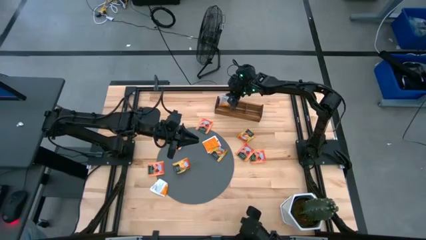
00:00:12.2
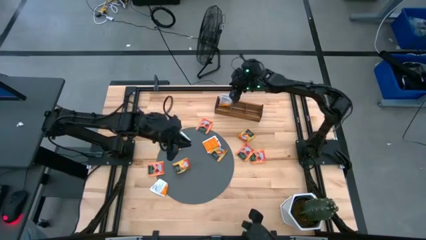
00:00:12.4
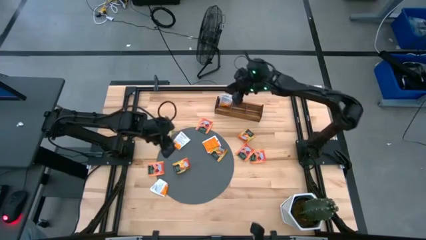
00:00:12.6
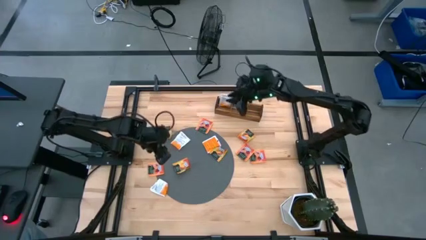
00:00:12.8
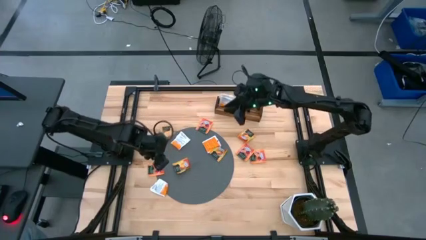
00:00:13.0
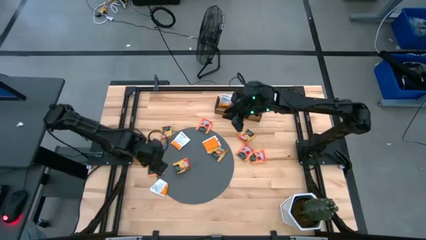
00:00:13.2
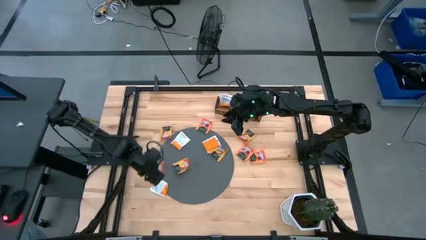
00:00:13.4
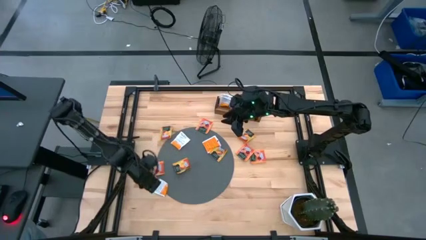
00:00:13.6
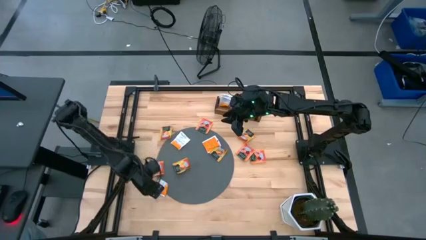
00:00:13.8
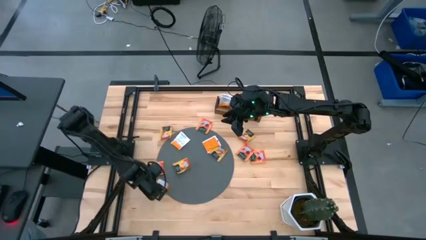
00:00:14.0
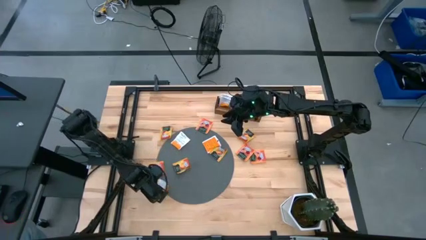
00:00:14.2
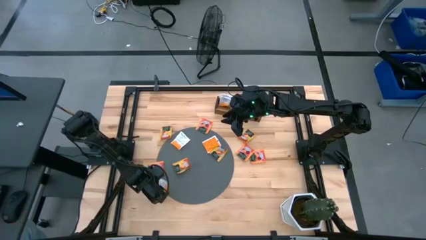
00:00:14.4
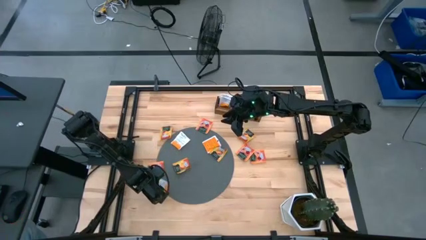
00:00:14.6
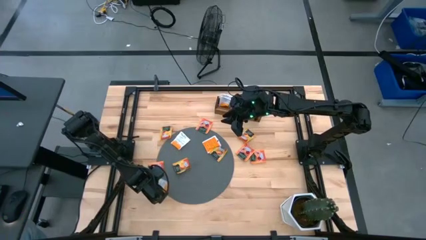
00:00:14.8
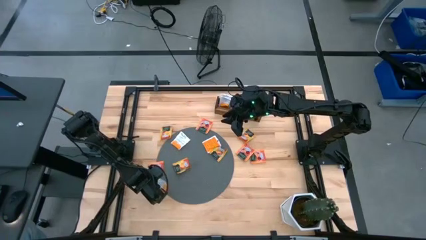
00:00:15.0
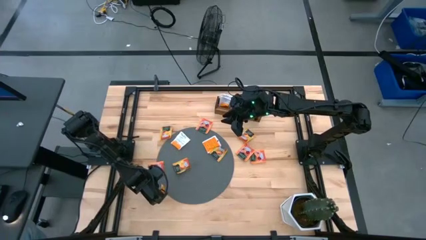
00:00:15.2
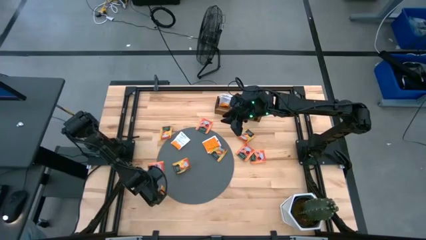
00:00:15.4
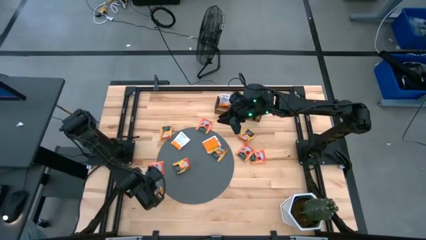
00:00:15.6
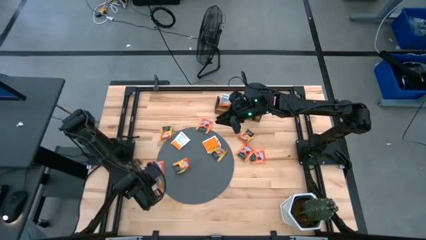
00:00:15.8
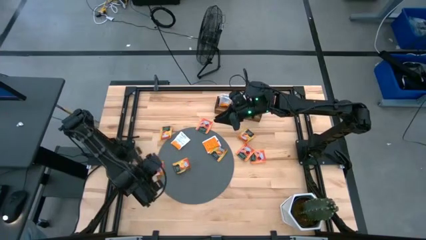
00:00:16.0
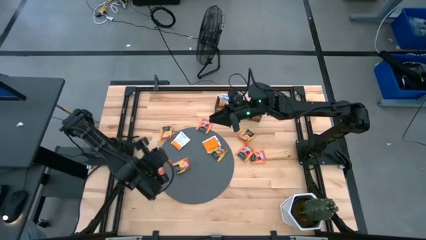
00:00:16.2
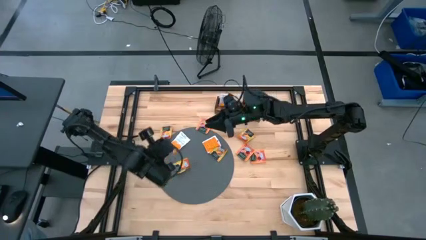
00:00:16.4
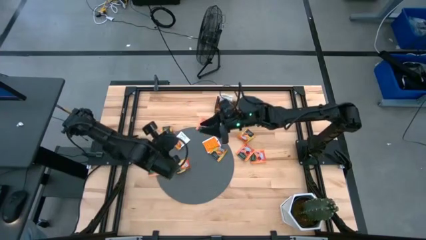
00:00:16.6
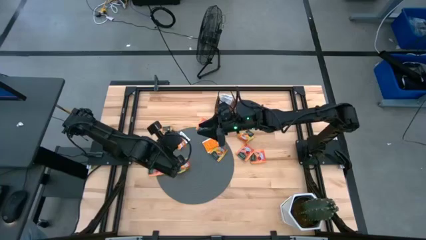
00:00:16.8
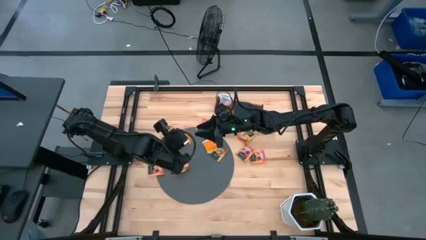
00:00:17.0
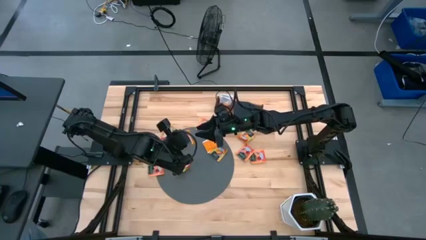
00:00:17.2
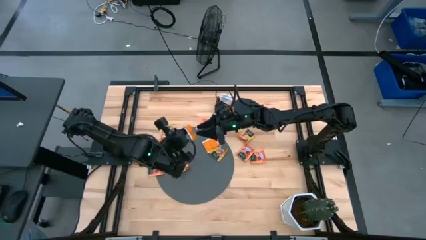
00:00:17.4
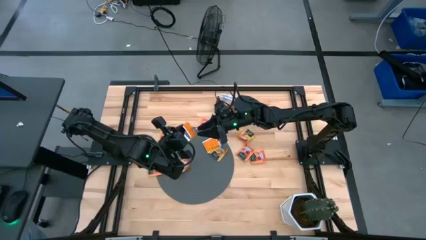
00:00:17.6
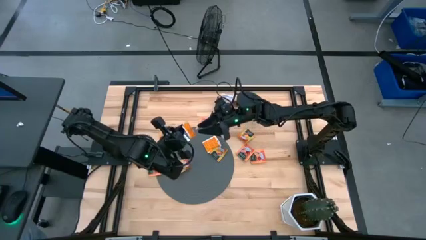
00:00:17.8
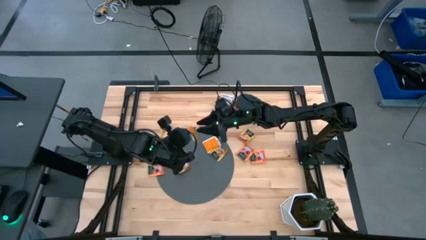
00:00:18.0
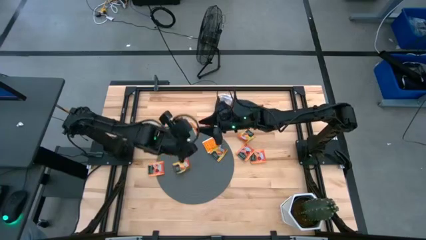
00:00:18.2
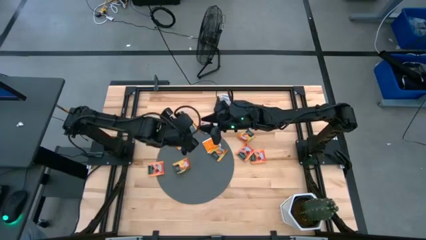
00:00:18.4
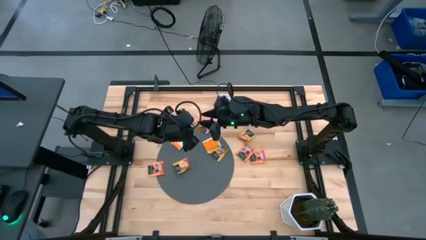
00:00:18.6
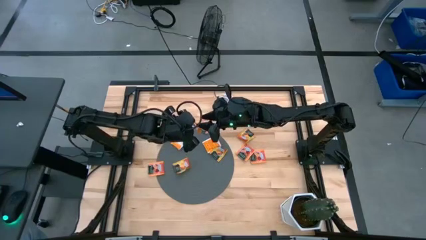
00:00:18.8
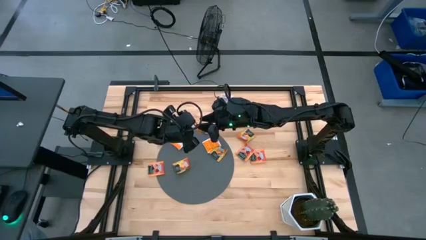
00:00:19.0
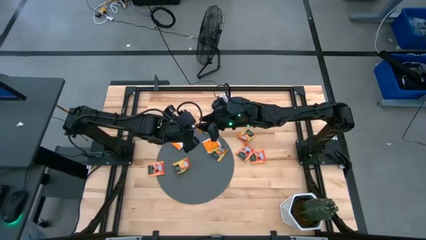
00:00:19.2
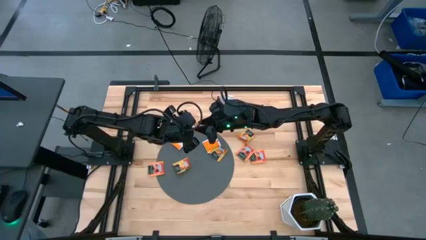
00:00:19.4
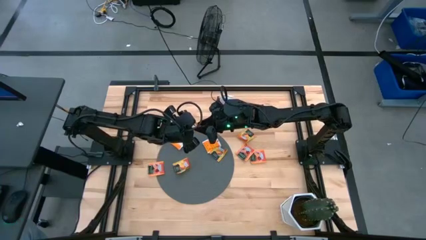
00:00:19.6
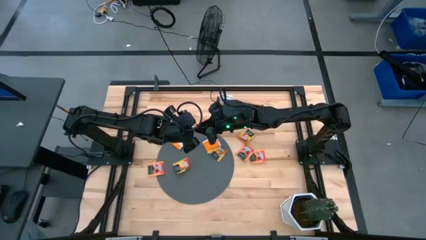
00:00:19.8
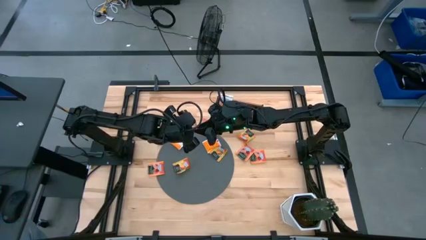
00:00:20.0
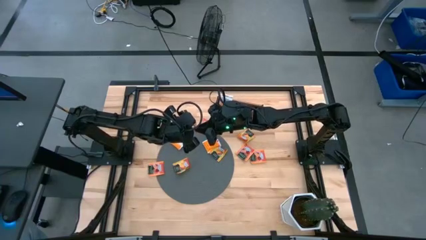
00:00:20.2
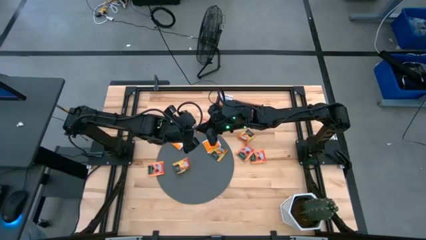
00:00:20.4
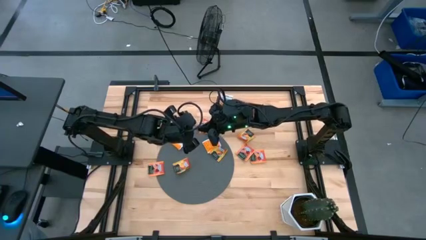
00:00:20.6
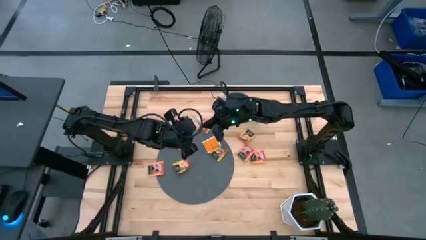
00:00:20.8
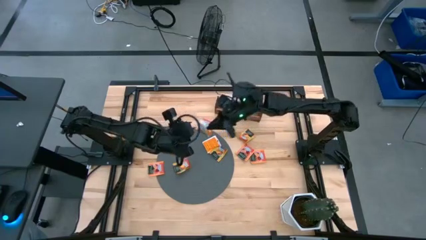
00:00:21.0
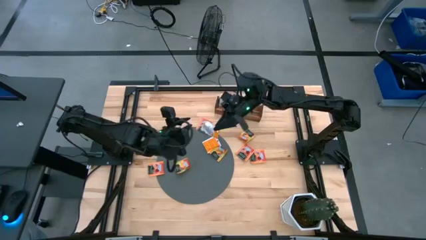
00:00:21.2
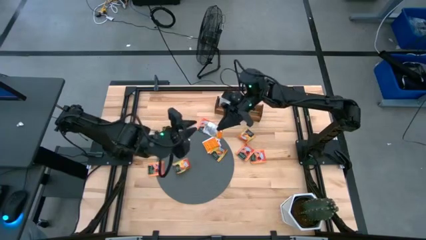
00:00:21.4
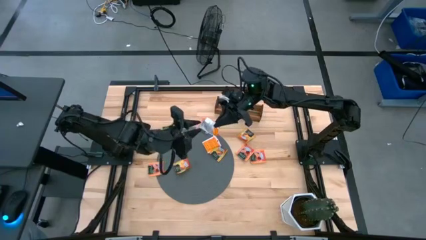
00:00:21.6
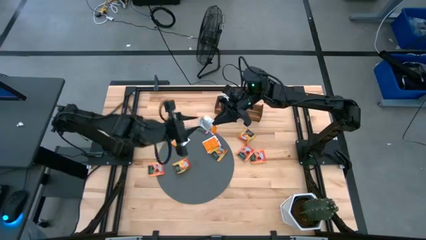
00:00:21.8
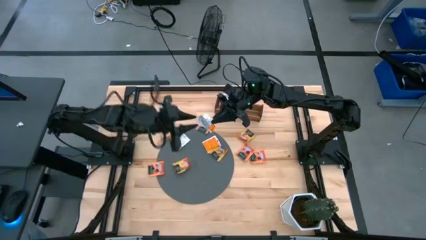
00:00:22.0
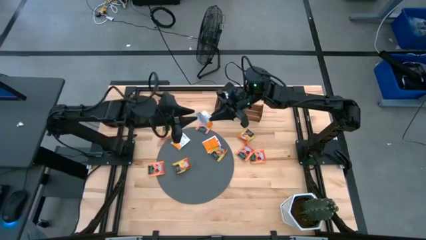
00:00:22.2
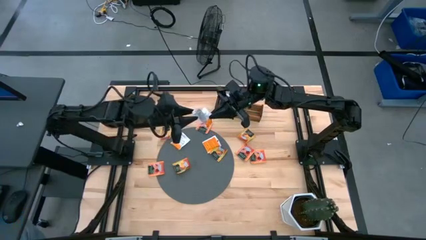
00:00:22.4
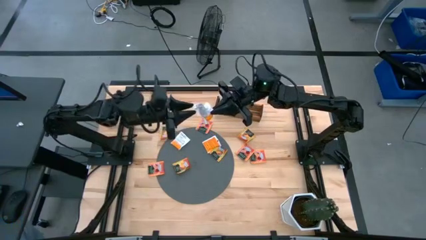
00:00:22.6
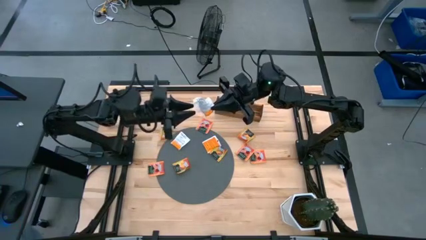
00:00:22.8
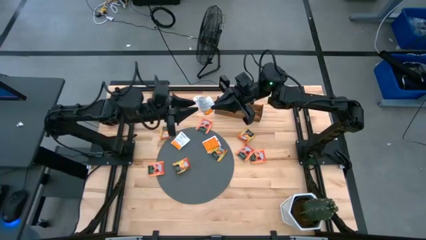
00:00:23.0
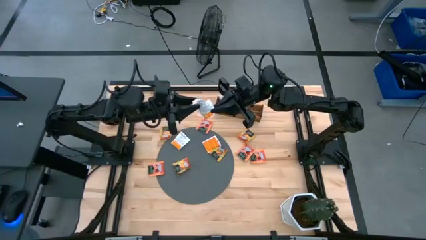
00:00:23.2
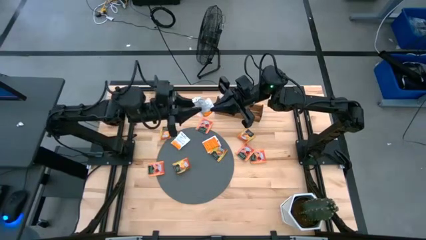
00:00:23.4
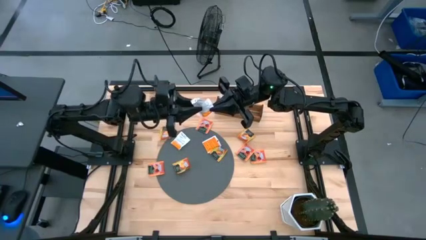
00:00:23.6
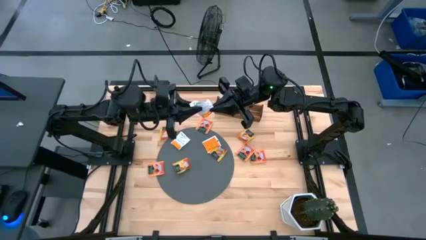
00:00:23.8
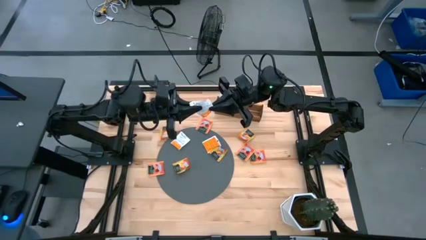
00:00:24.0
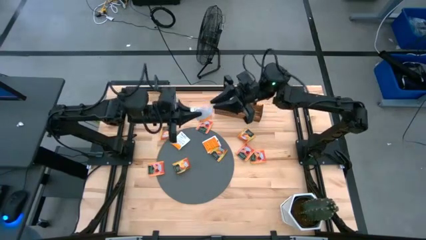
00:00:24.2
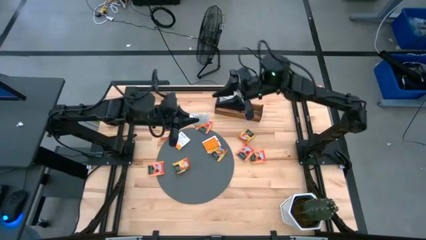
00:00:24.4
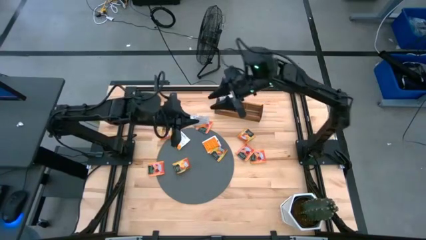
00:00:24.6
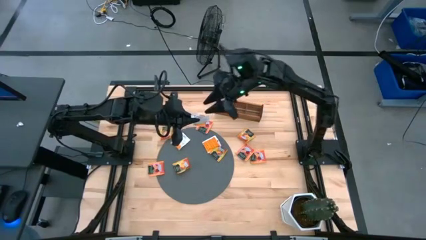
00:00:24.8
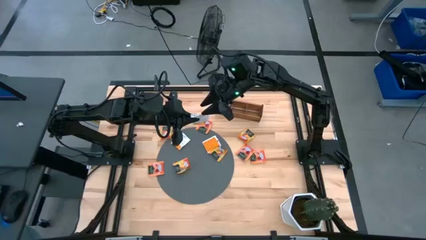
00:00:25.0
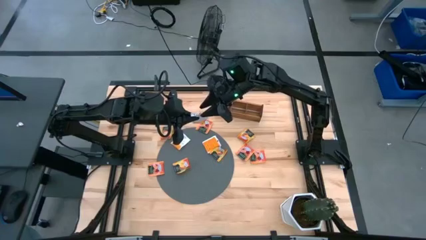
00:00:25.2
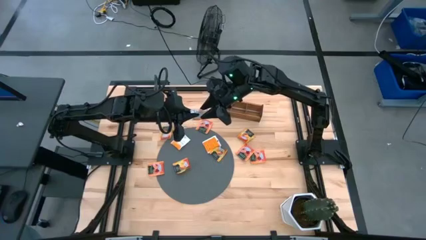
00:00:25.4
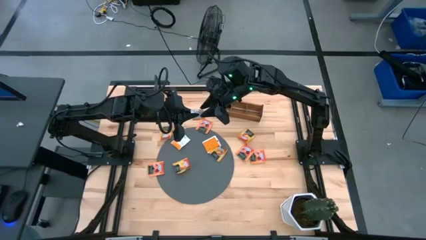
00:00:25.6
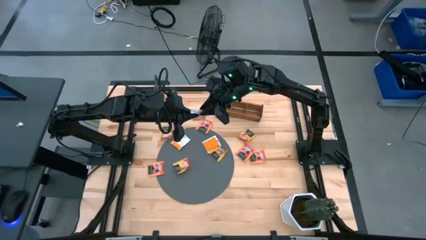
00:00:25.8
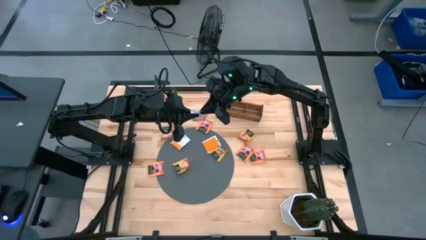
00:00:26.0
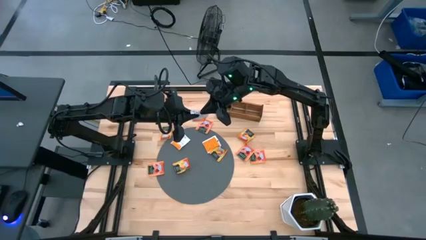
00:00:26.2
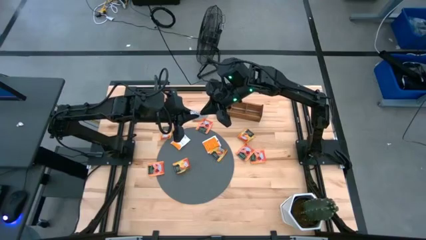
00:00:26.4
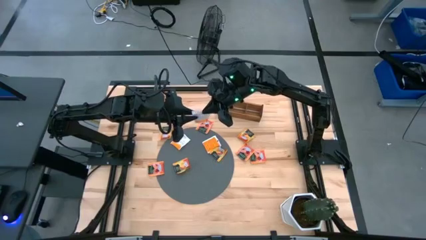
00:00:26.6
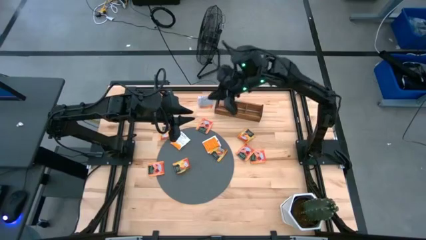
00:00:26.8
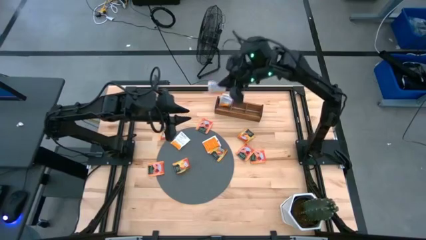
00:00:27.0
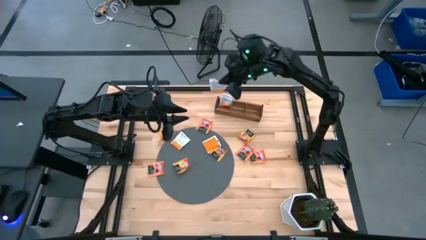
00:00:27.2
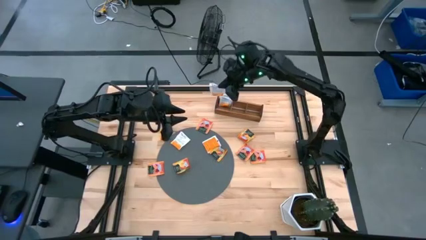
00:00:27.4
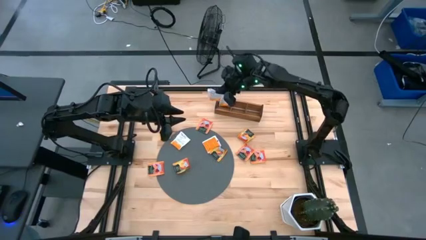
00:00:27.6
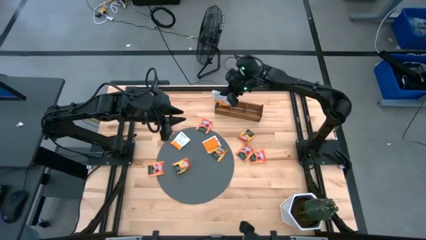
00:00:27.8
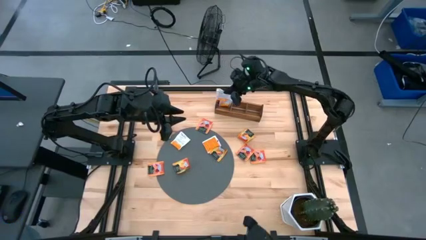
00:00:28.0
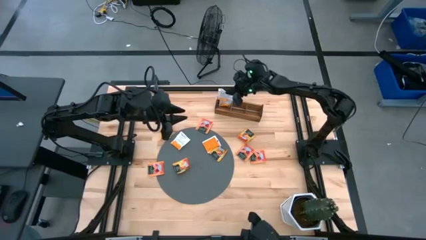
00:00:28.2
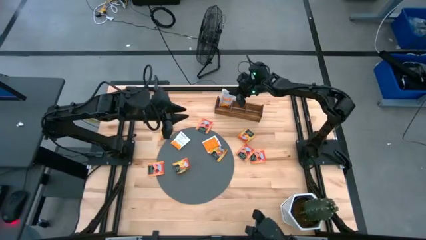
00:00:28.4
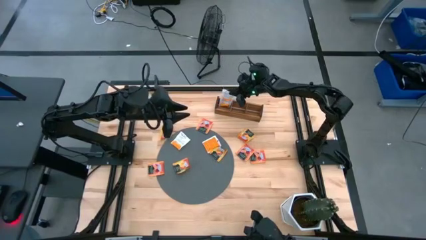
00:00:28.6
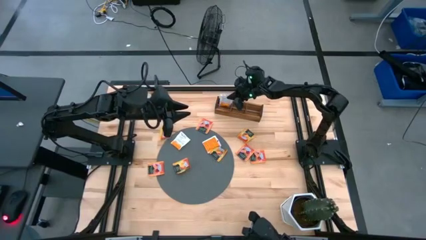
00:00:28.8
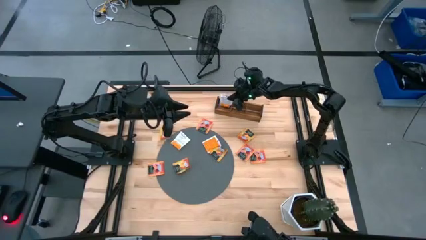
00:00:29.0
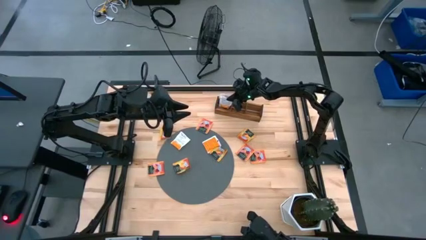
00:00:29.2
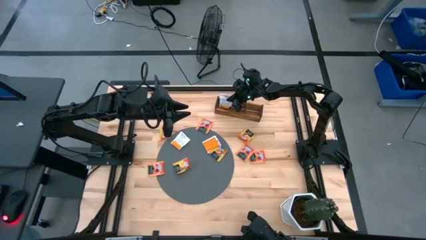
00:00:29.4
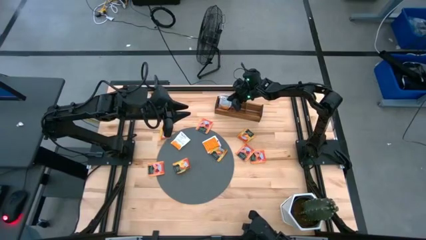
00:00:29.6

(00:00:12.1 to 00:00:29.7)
Task: Pick & Place Tea
Put the white tea bag into the left section of the wooden organizer
